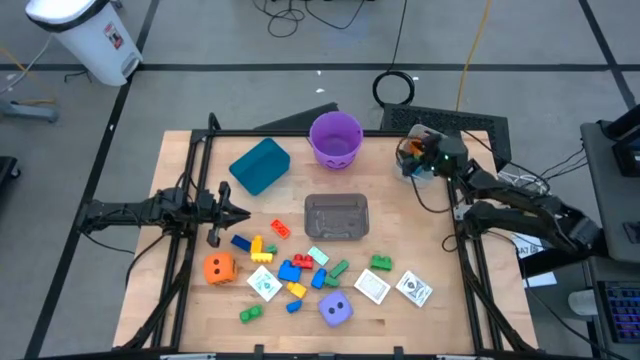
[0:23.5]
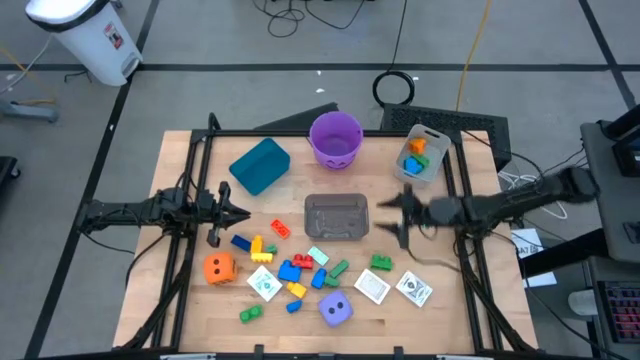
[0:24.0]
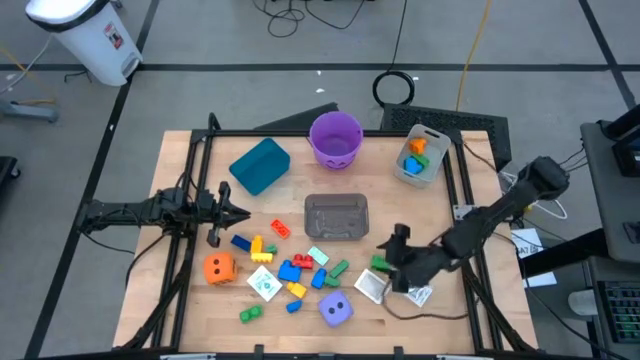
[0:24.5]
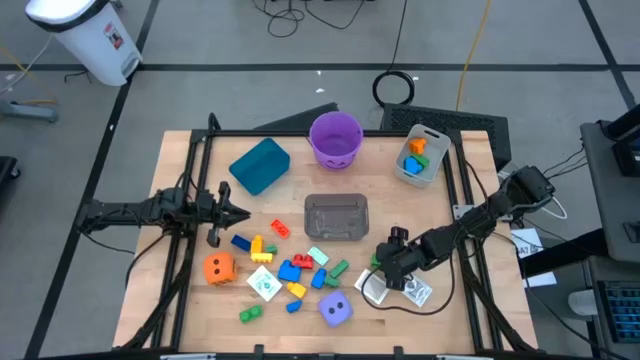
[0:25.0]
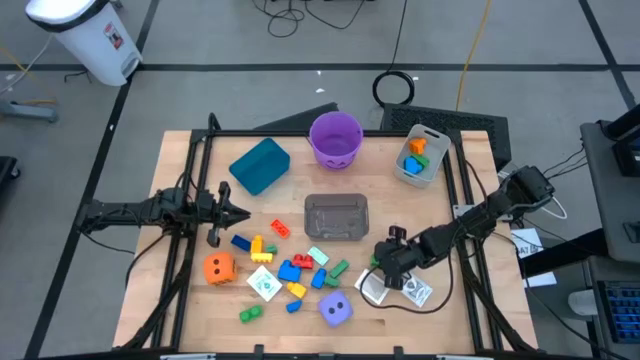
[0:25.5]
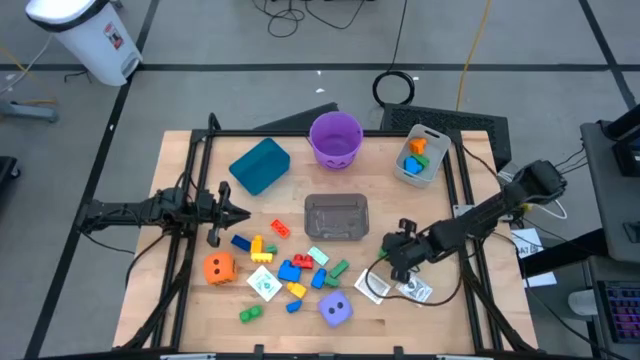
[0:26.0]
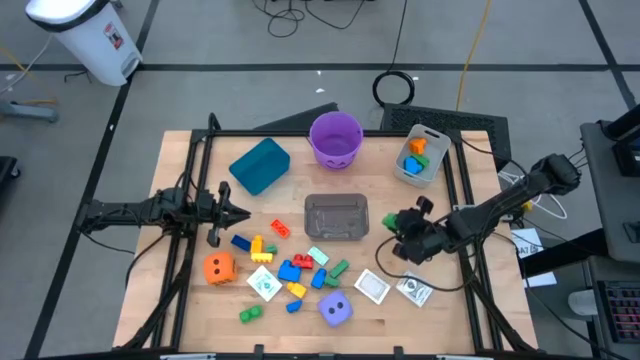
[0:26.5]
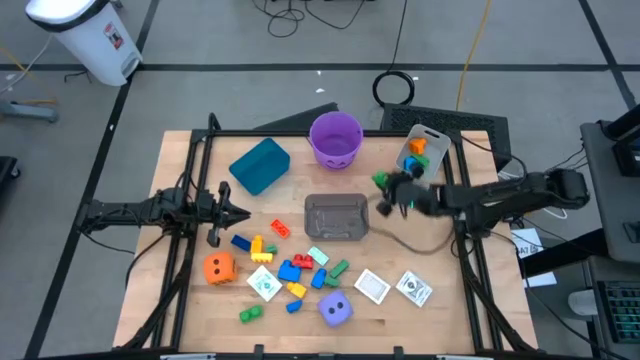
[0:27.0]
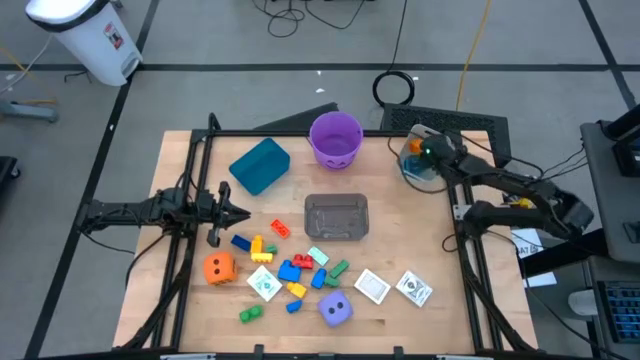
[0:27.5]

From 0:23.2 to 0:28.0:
Task: Pick & Place Toys
Put the right green game piece into the white bin

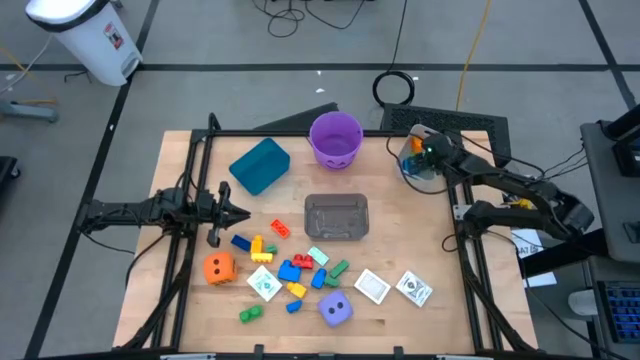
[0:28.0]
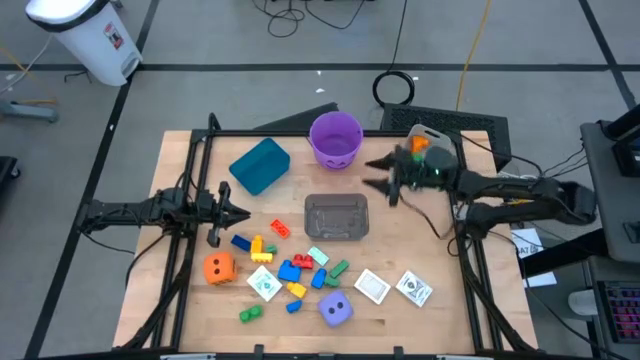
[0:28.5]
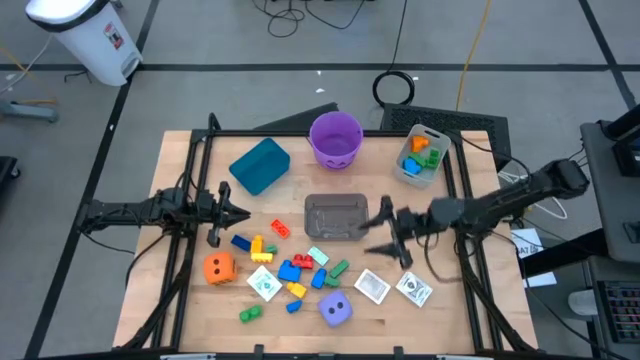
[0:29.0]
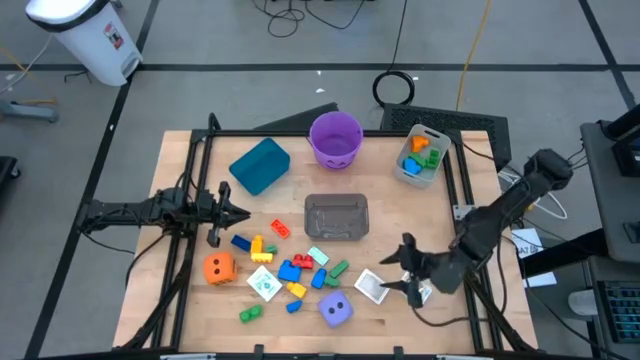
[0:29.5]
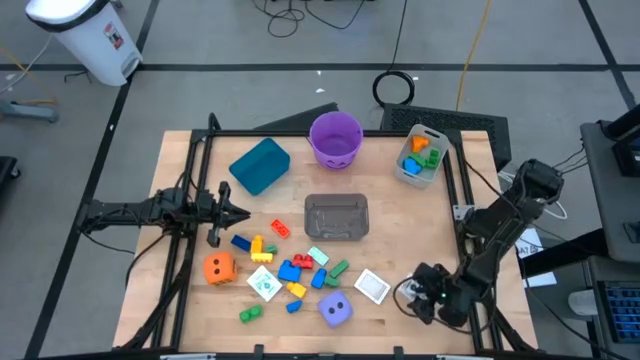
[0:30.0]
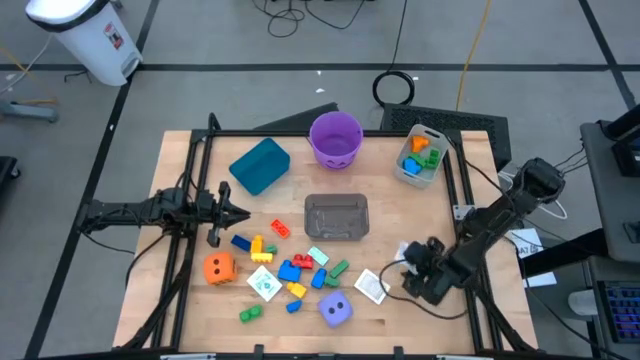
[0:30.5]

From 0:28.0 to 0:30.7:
Adjust the black deck of cards

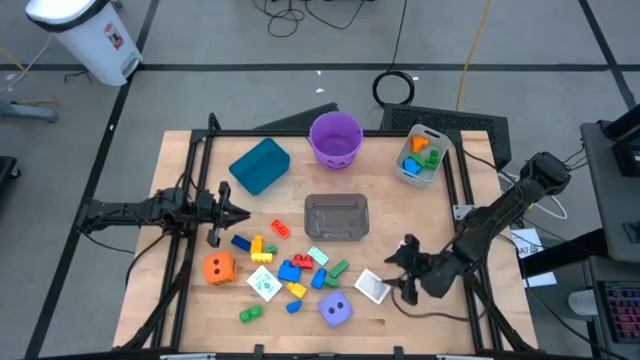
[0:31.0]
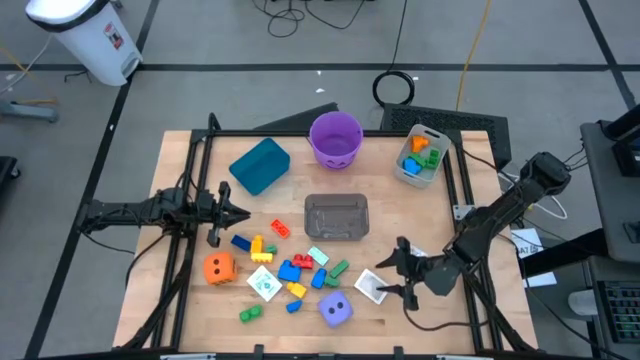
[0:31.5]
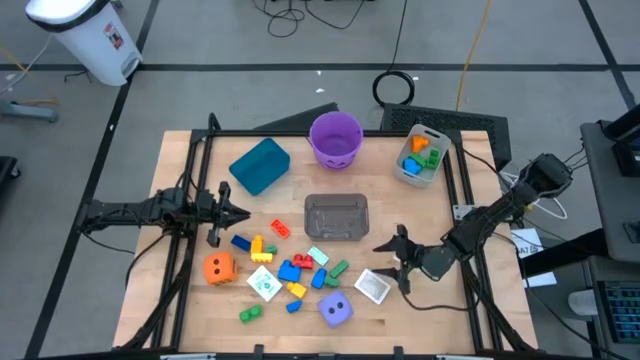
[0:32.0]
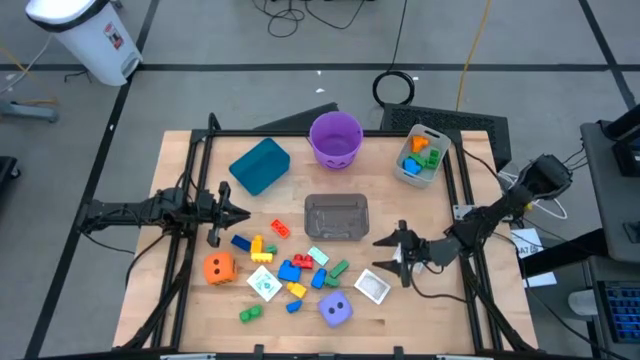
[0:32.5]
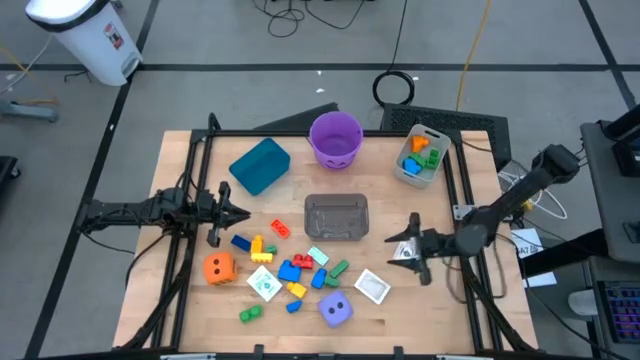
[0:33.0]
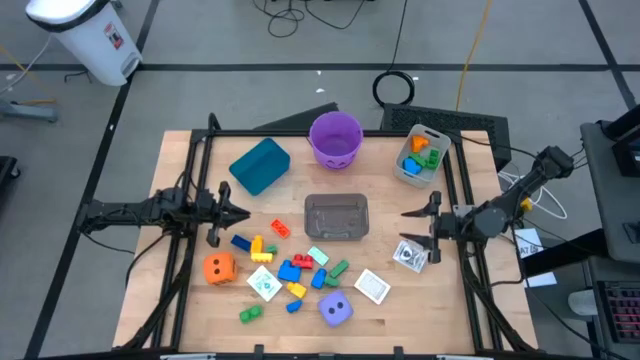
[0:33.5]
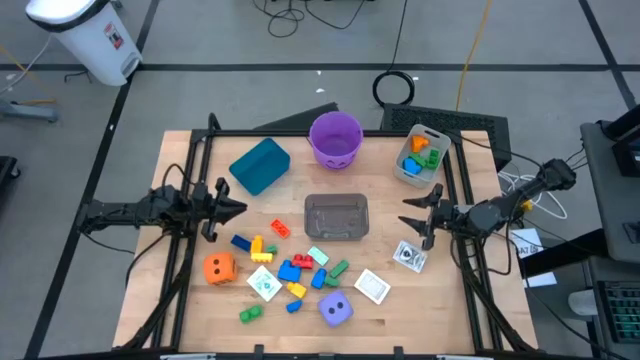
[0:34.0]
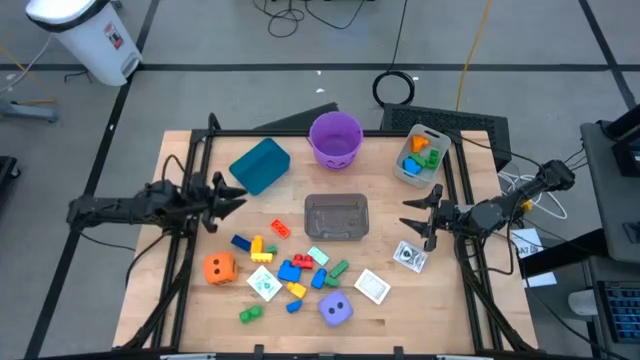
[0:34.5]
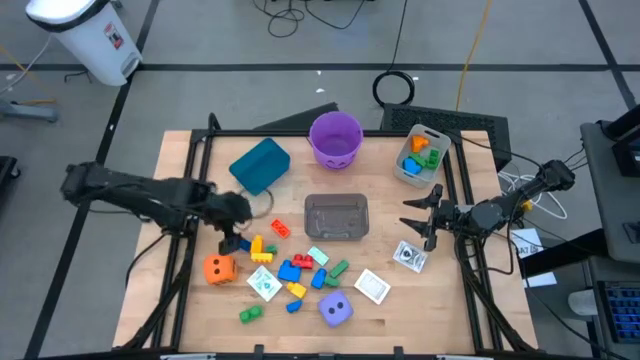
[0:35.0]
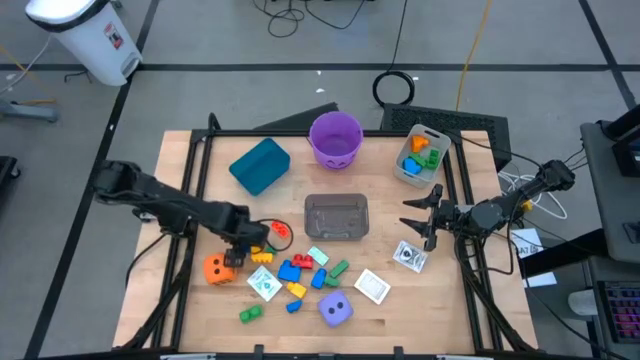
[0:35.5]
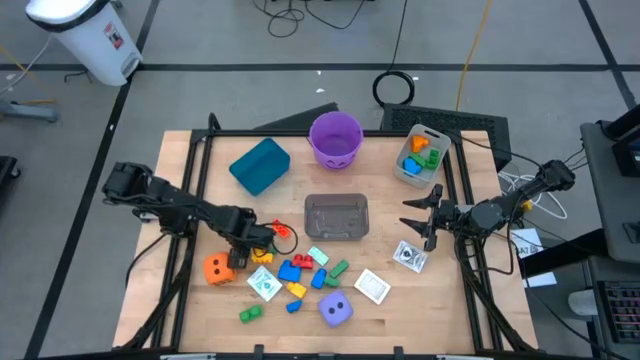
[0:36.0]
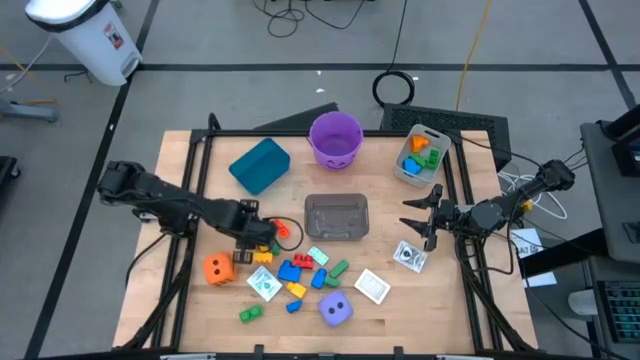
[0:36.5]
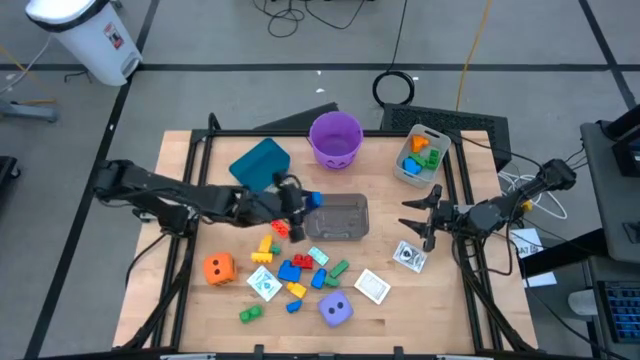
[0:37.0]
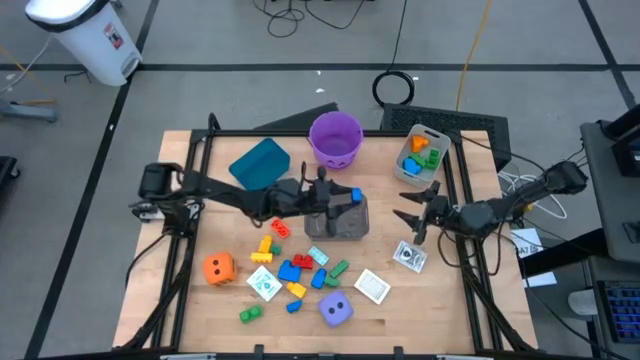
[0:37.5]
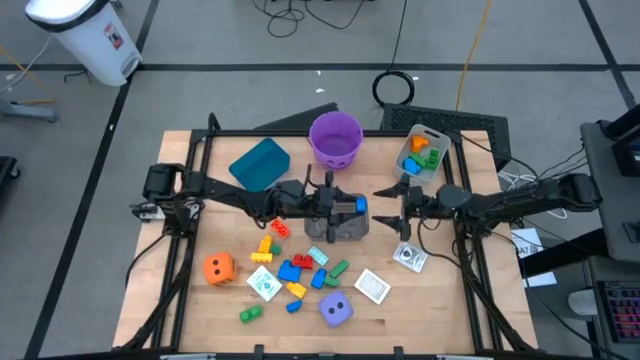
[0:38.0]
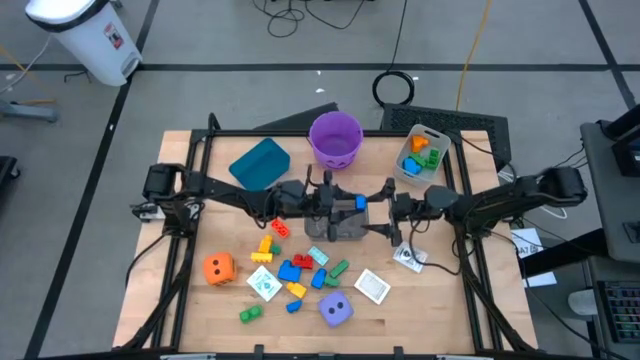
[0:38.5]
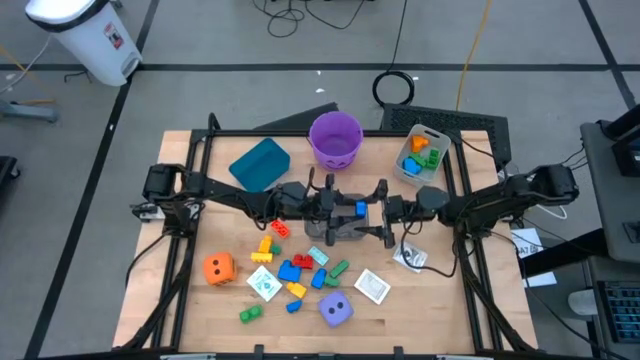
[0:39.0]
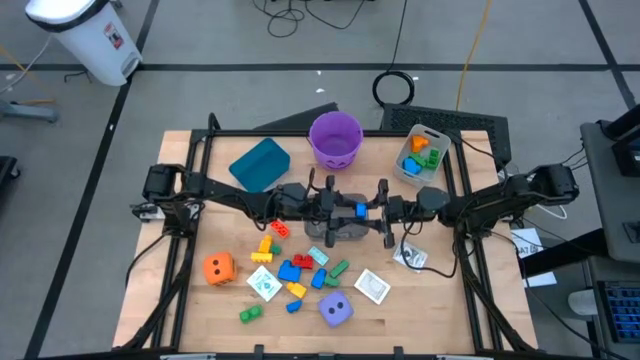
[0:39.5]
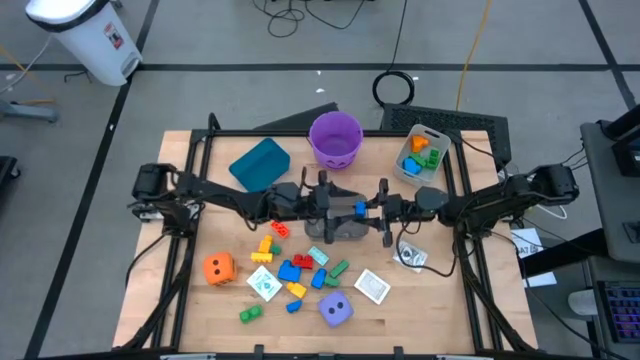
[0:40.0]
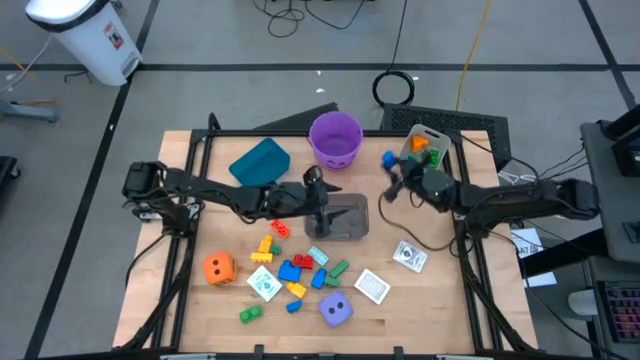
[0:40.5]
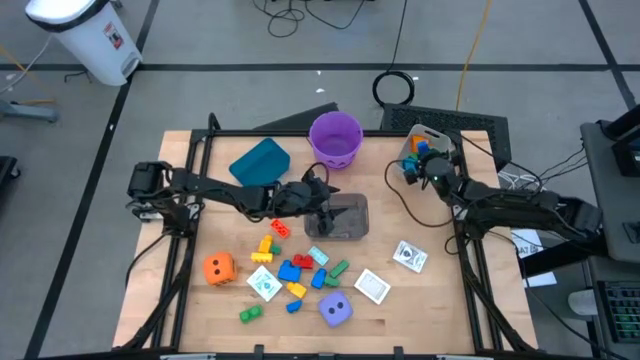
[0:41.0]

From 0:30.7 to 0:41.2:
Put the dark blue game piece into the white bin

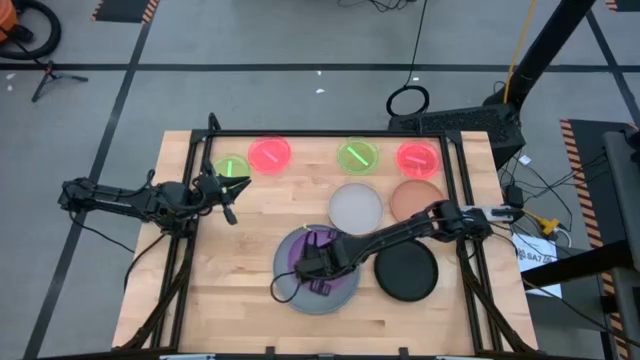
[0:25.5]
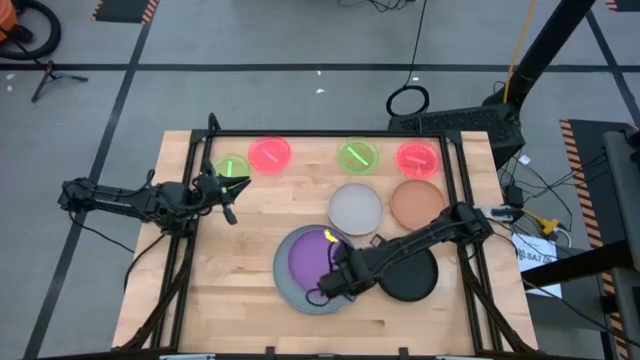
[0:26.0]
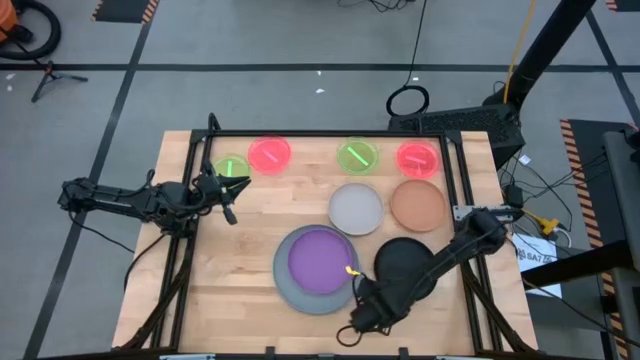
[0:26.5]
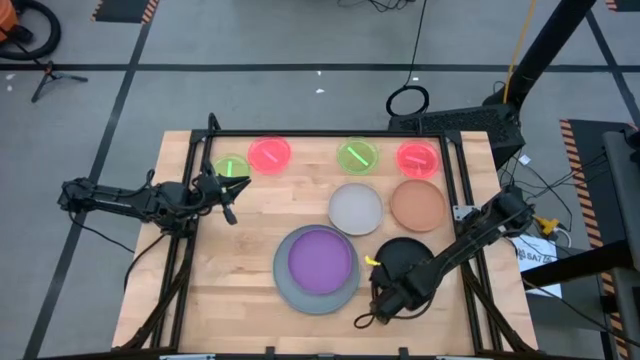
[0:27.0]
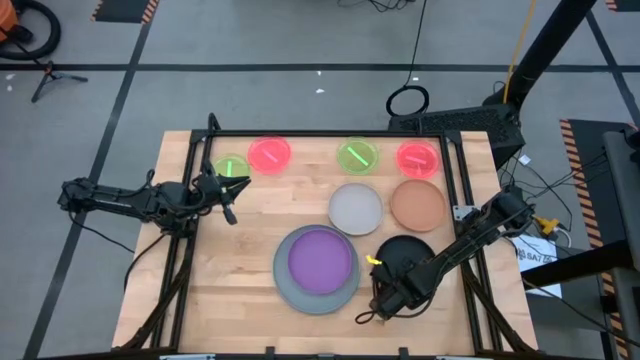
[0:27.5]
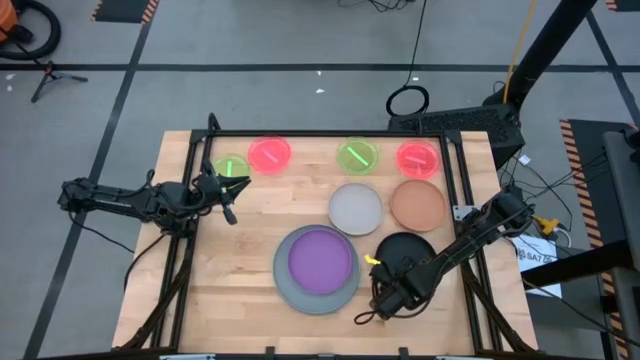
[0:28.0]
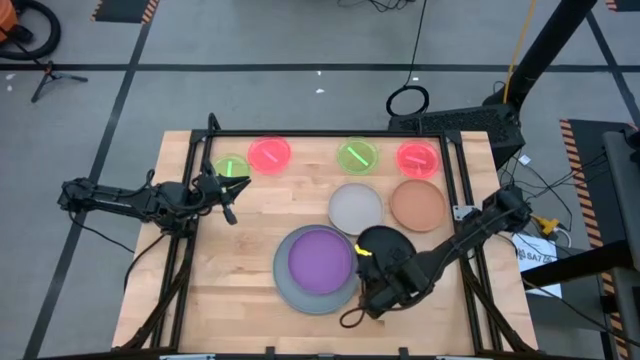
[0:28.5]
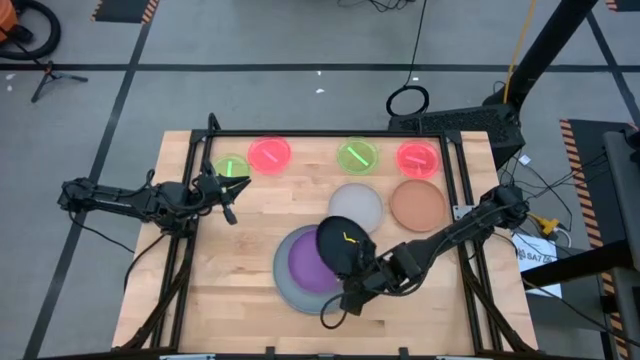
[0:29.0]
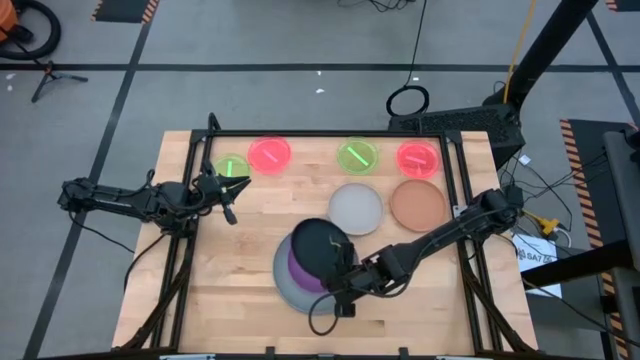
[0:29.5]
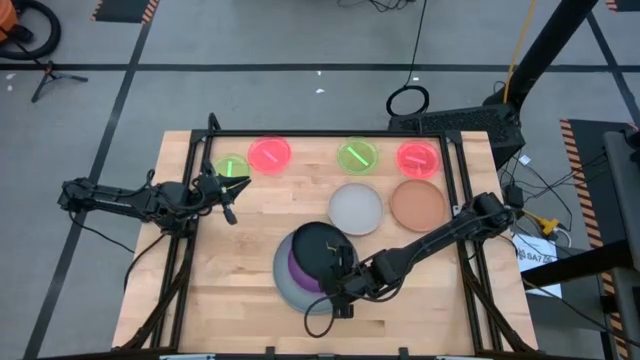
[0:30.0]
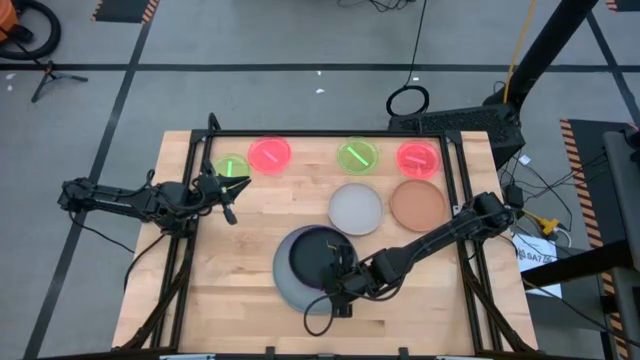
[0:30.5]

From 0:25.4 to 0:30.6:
Task: Stack plastic plates
Stack the black plate on top of the purple plate
